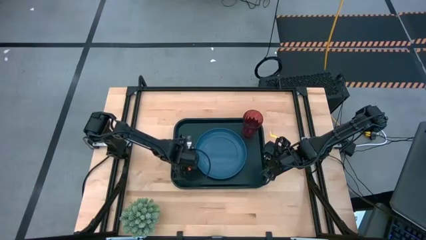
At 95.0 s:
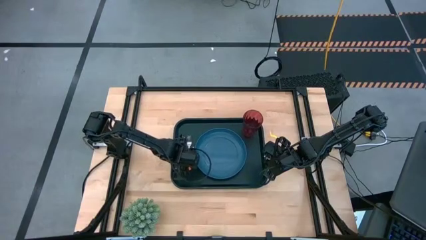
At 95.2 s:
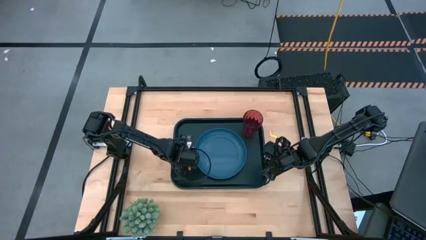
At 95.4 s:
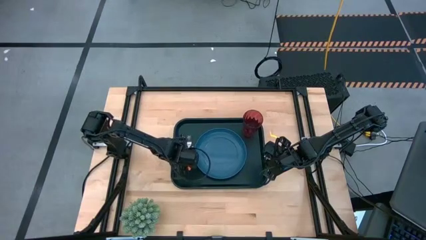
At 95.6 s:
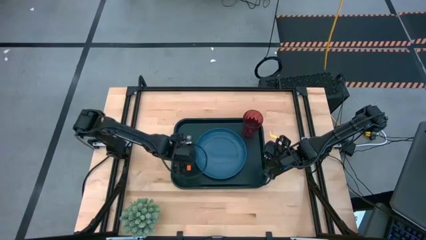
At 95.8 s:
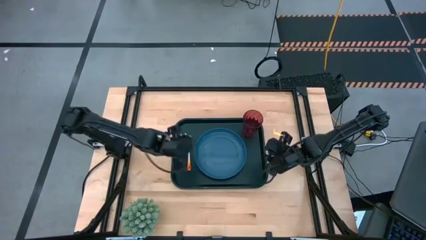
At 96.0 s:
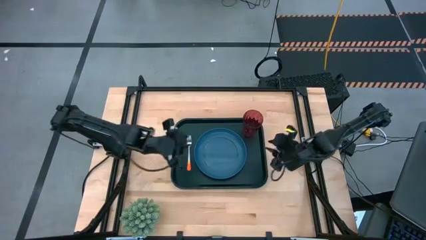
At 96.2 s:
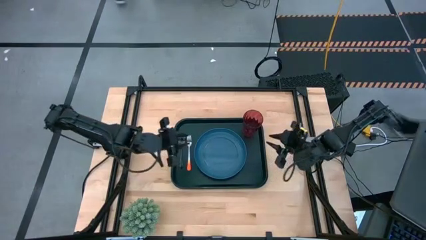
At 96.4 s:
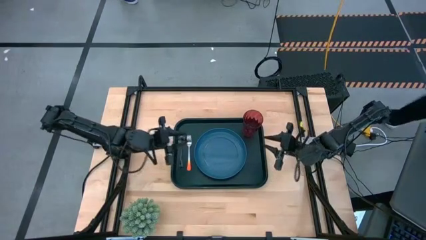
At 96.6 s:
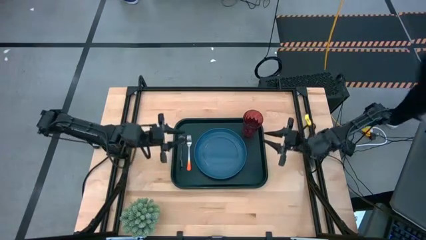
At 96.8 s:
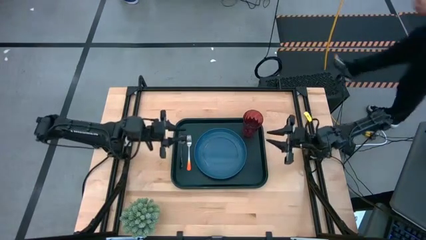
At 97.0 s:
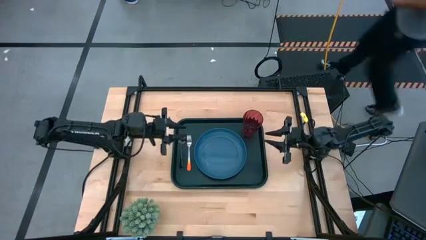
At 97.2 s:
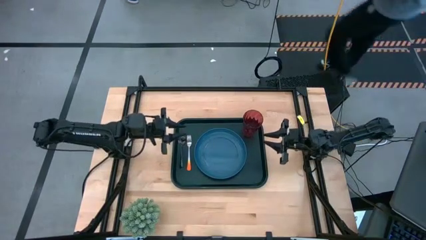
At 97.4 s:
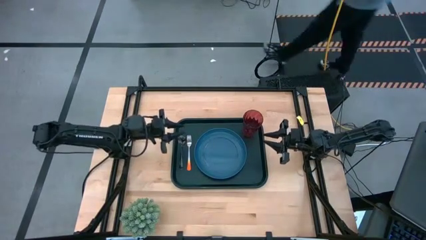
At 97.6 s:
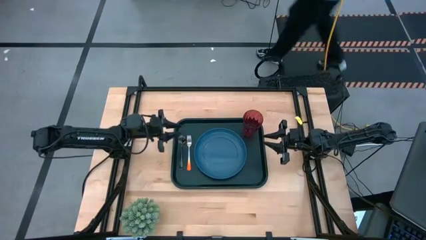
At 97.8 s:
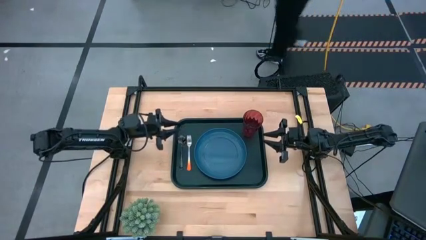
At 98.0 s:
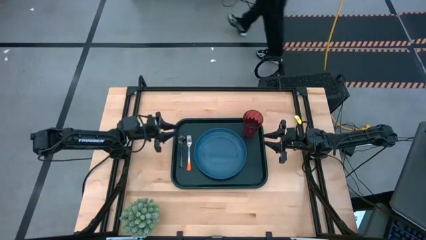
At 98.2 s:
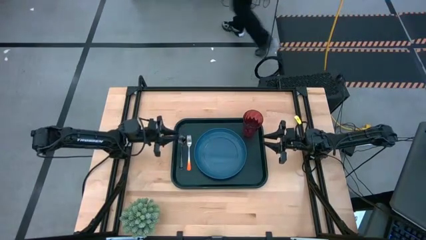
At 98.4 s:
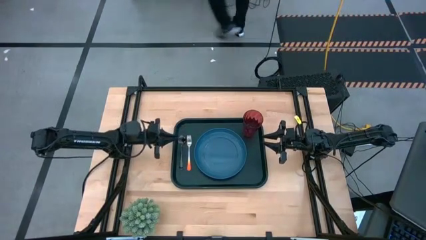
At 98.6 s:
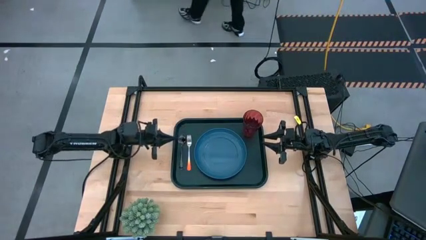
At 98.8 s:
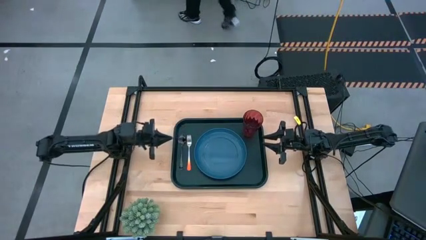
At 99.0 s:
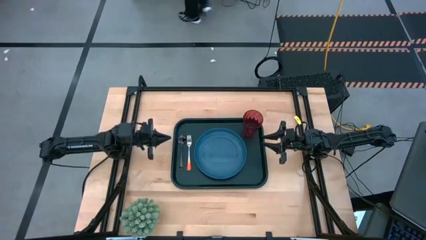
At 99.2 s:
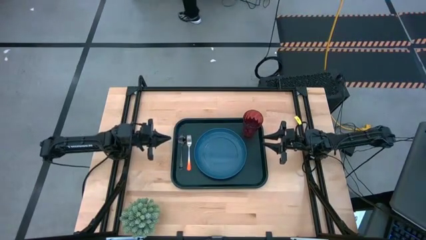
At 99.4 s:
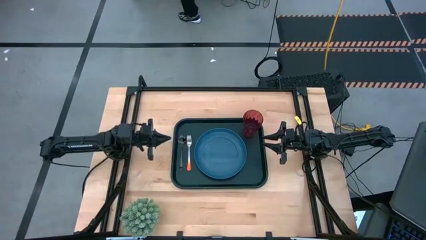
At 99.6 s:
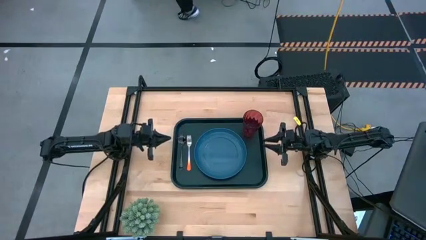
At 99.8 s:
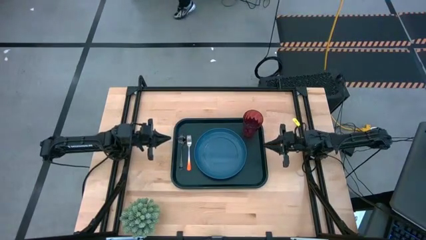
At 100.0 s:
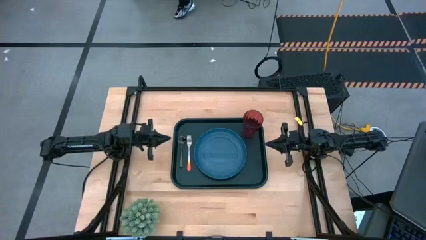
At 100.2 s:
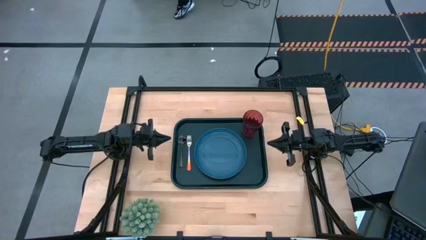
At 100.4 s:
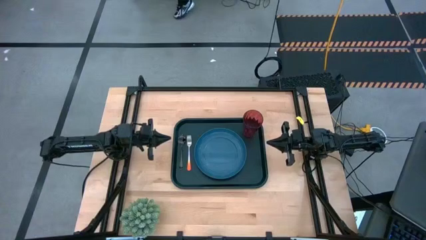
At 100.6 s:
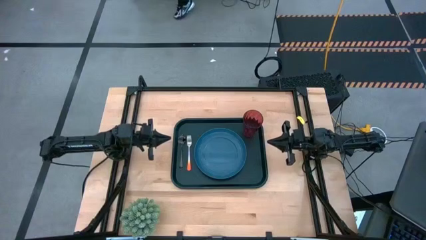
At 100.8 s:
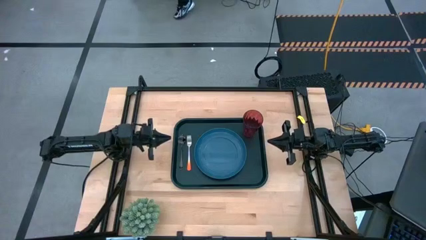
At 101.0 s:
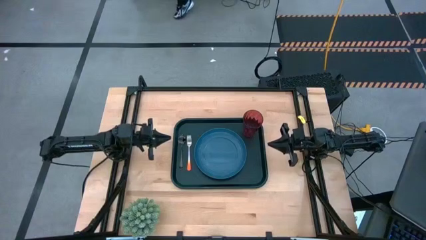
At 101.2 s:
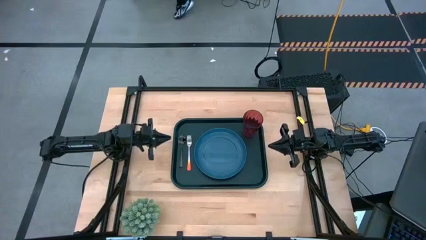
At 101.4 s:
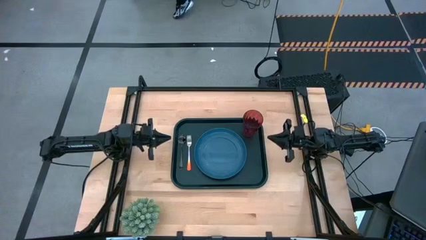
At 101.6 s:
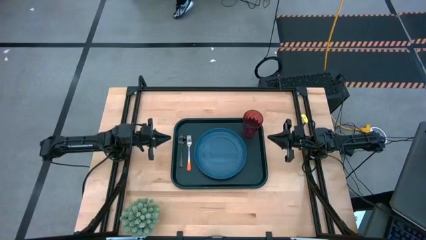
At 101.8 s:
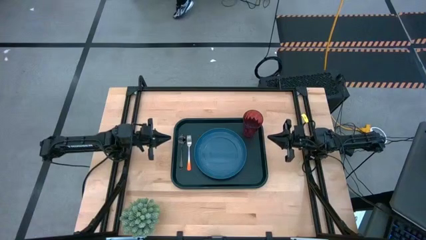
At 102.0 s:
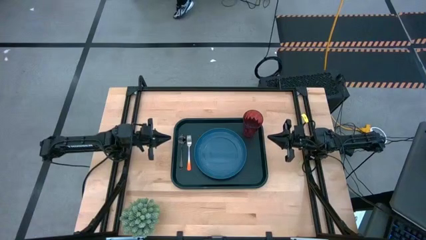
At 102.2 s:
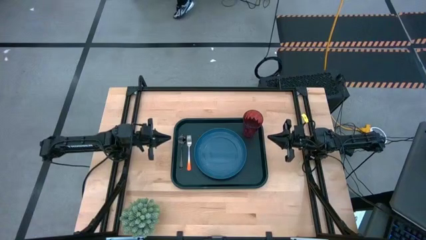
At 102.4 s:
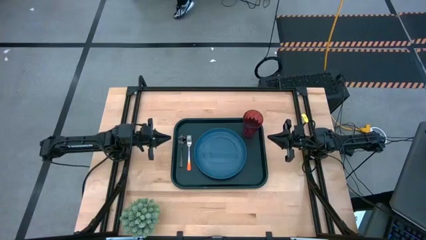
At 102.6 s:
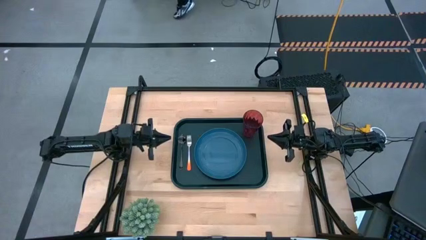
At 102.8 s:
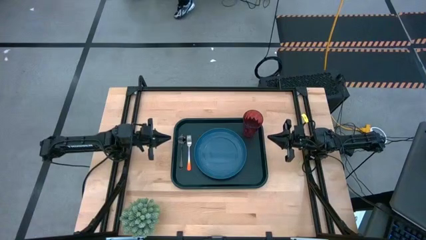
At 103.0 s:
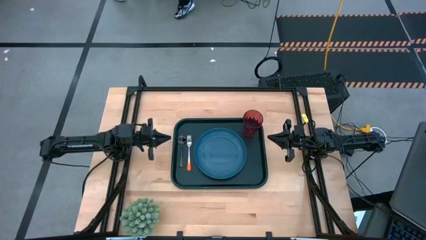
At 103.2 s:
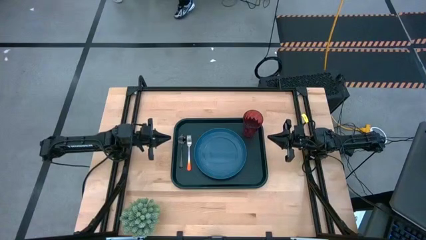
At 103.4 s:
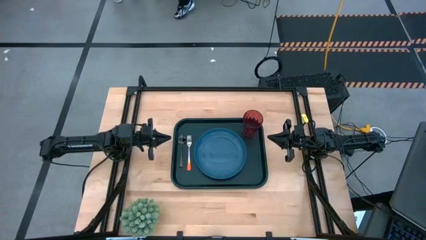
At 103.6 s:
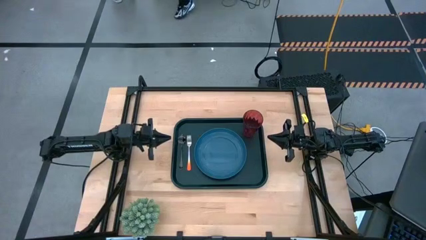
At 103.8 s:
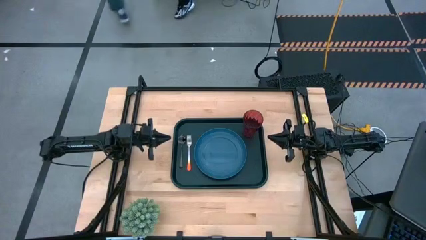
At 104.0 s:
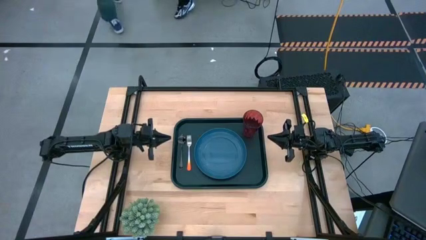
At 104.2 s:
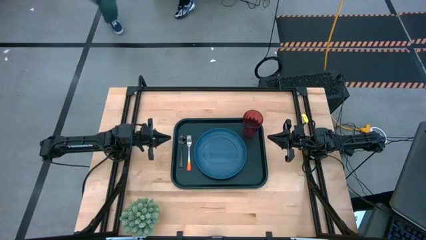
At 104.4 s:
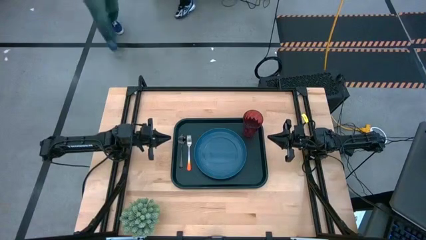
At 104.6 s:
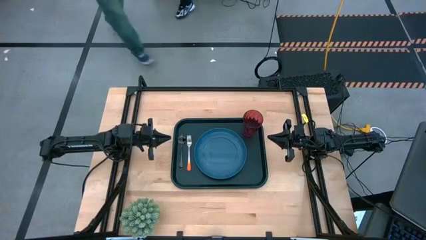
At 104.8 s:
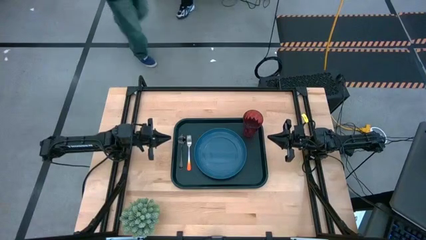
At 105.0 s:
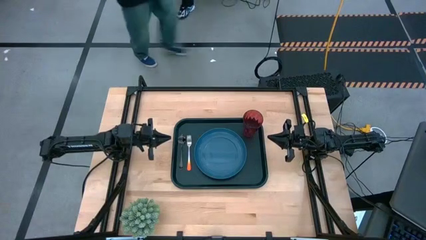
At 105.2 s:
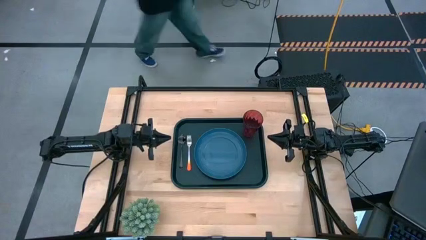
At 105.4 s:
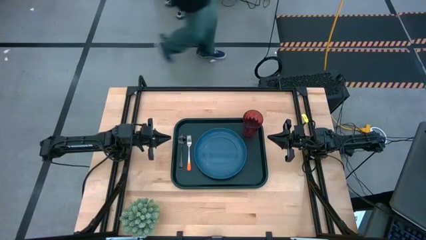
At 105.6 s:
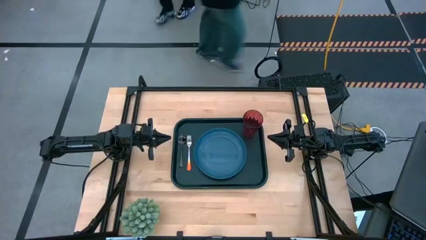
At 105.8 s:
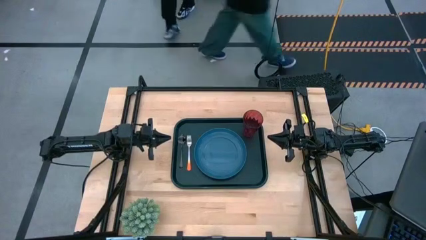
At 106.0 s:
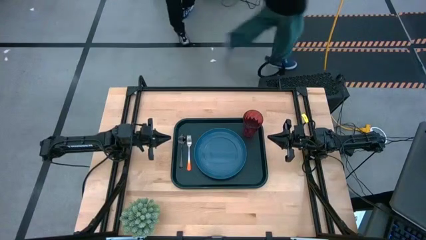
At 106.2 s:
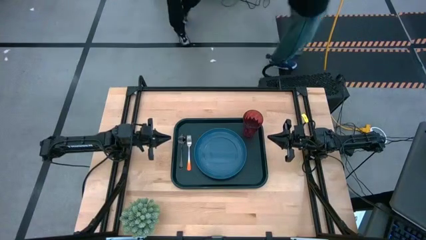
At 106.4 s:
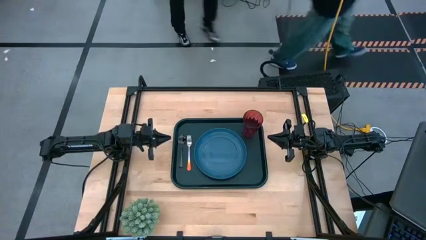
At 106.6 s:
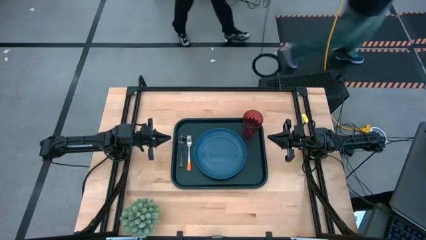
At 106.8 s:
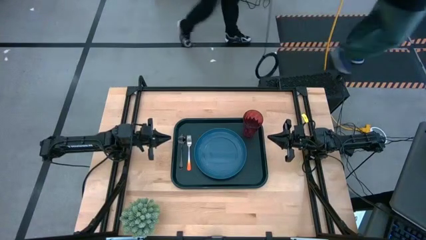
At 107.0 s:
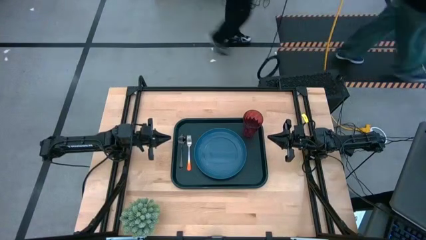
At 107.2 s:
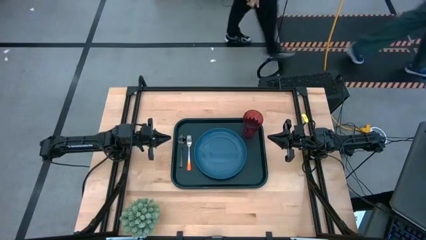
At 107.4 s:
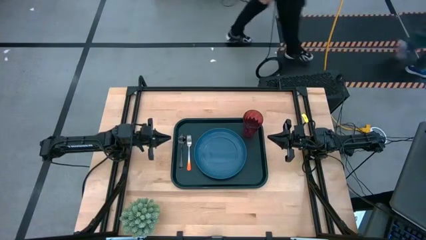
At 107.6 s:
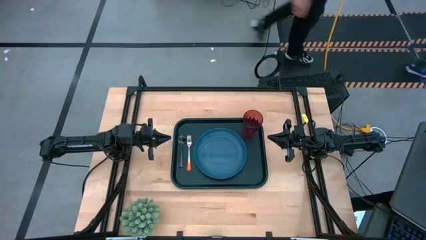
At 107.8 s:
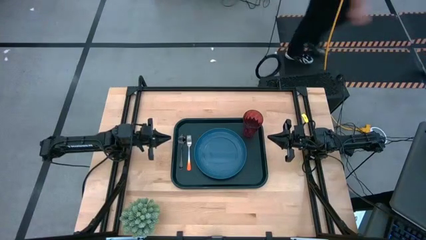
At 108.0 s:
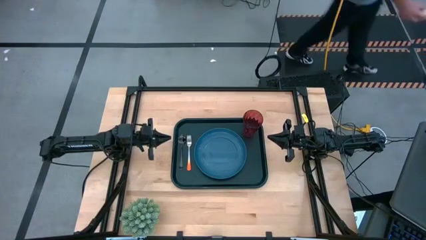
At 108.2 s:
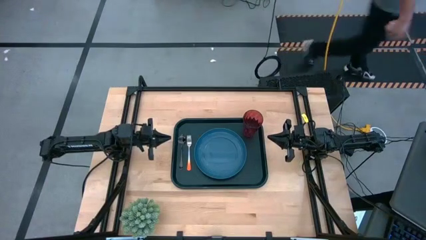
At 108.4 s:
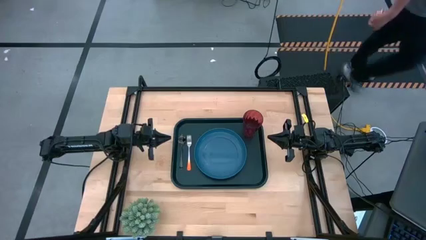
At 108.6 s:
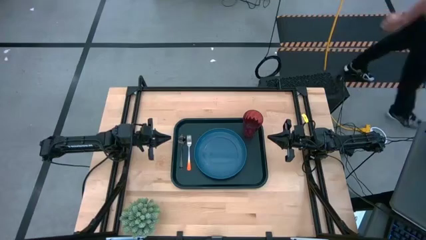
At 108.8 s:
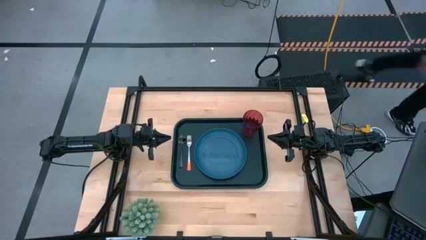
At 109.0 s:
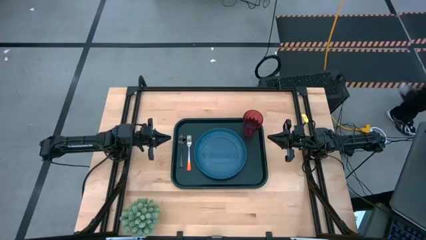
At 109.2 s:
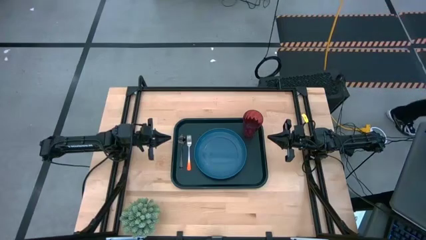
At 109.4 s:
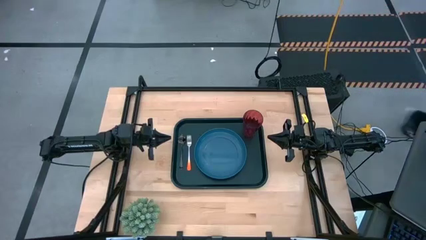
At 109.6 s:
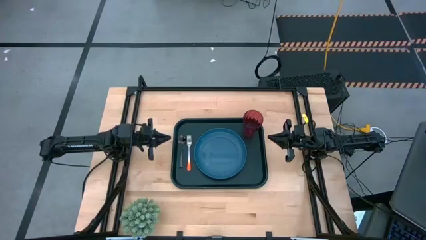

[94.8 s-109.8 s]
Task: Pick and place plate/cup/fork/spoon on tray
Return to Home Position

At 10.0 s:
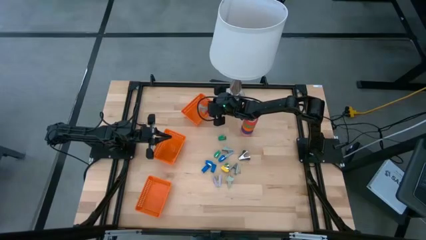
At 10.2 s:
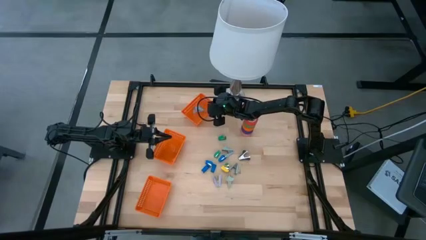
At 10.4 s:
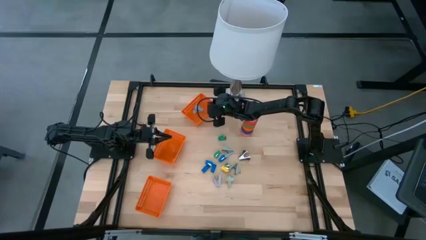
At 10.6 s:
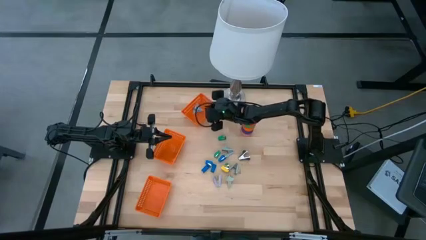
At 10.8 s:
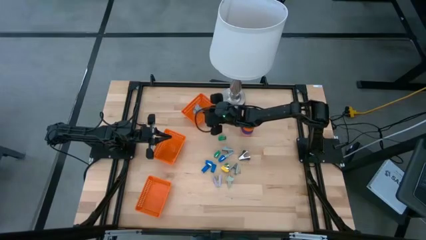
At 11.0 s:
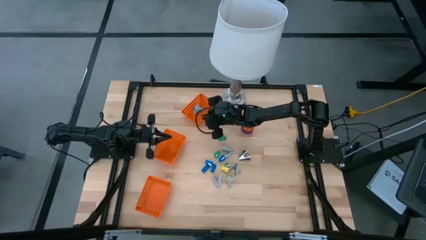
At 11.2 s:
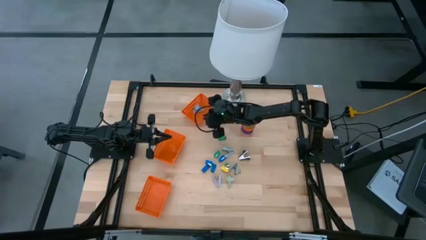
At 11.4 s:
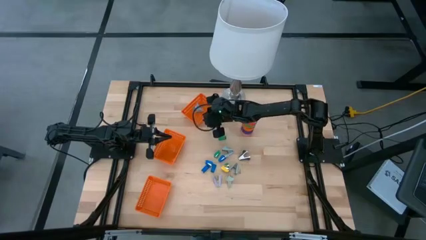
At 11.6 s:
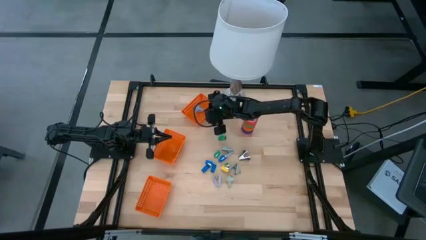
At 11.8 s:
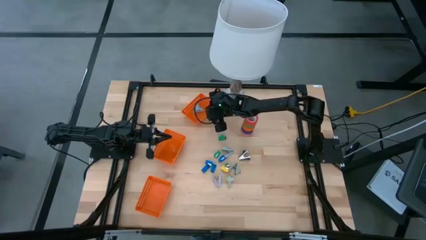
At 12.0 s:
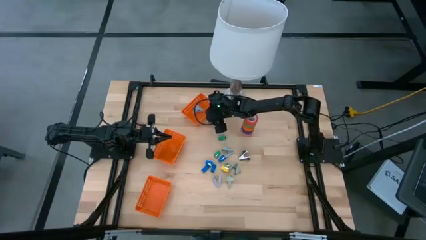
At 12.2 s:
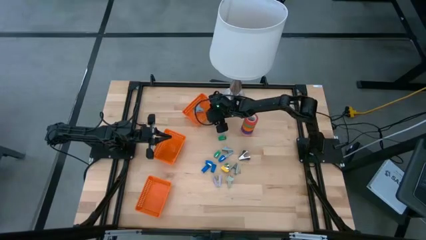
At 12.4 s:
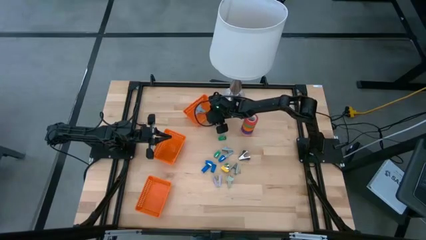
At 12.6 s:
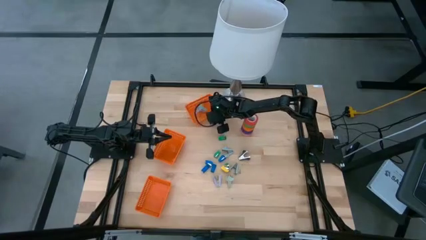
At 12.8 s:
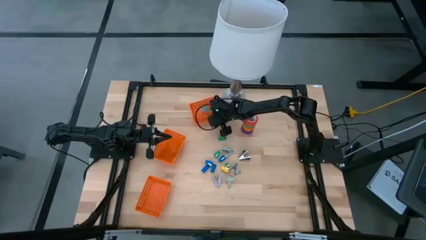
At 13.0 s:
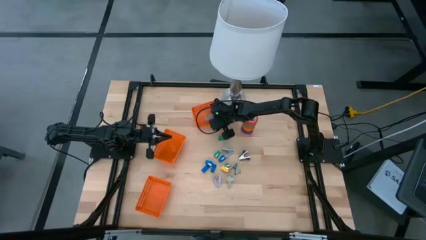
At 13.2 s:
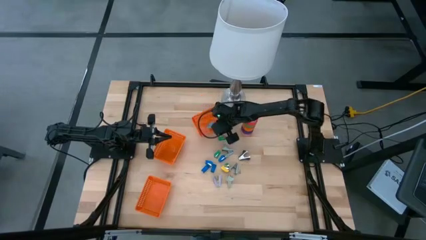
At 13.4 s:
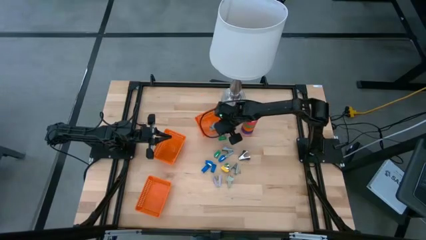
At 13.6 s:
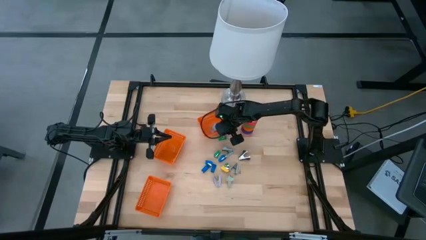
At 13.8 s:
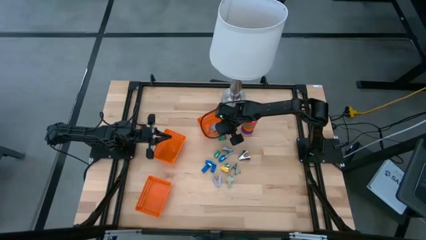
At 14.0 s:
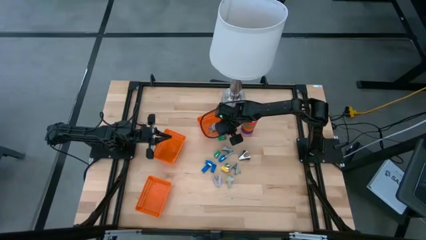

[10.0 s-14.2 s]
Task: Pick and place Stapler, Stapler remover, tape
Adjust the top orange bin
